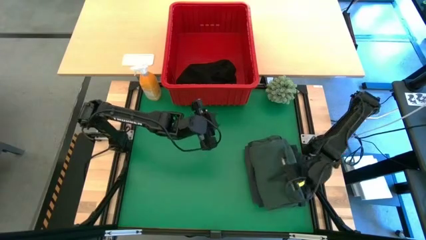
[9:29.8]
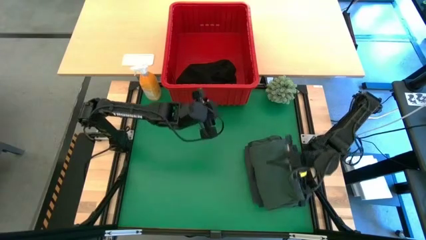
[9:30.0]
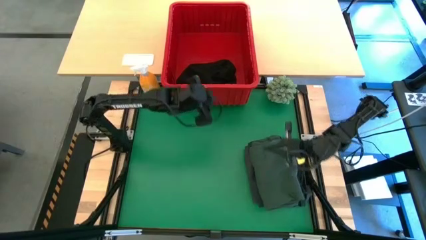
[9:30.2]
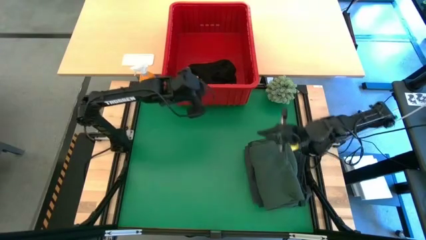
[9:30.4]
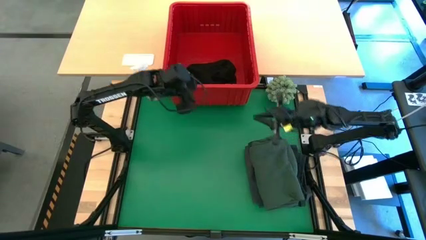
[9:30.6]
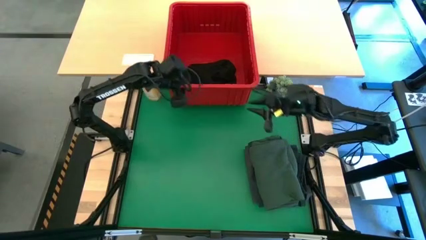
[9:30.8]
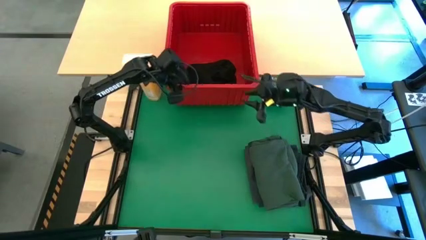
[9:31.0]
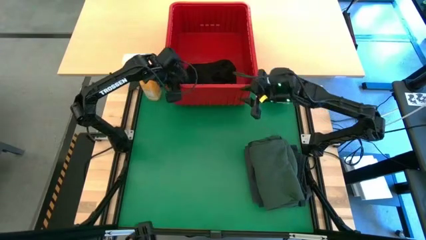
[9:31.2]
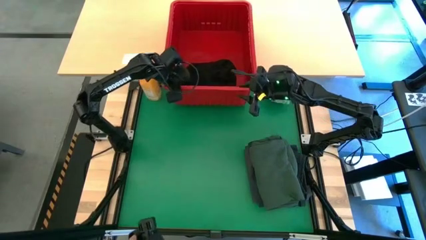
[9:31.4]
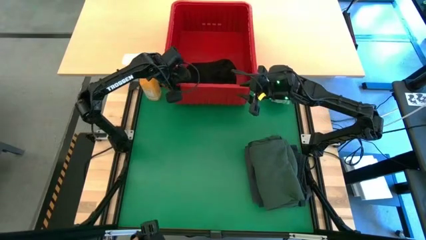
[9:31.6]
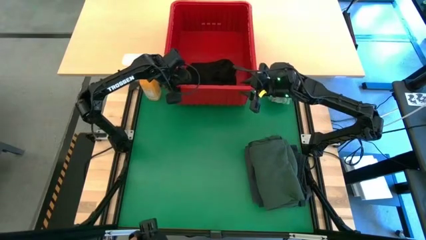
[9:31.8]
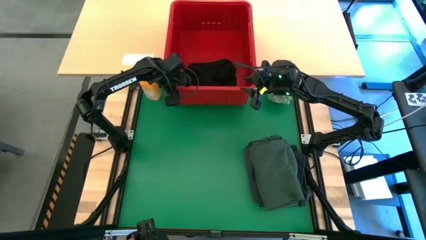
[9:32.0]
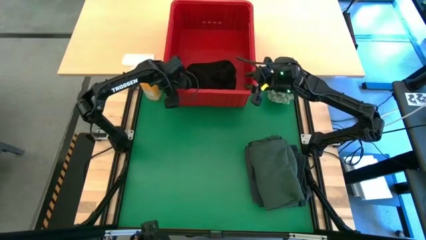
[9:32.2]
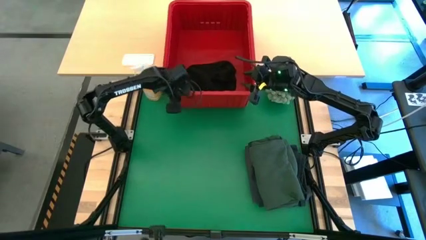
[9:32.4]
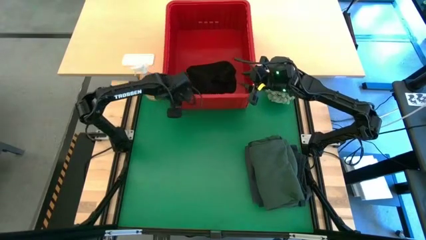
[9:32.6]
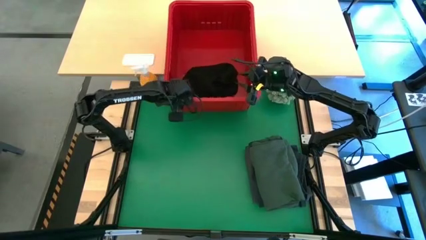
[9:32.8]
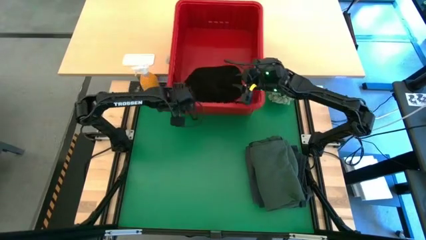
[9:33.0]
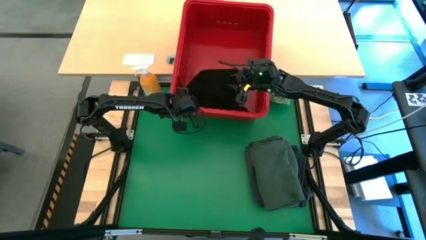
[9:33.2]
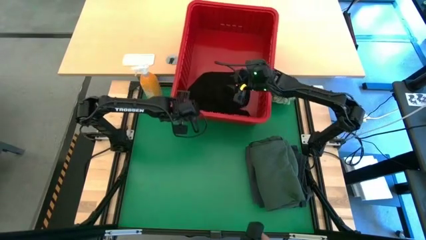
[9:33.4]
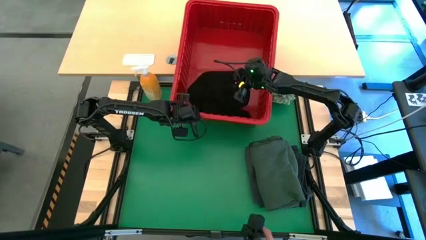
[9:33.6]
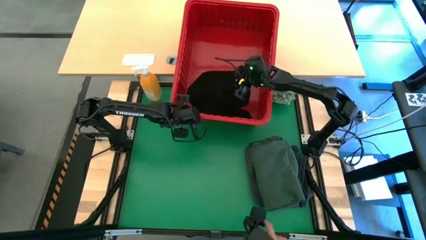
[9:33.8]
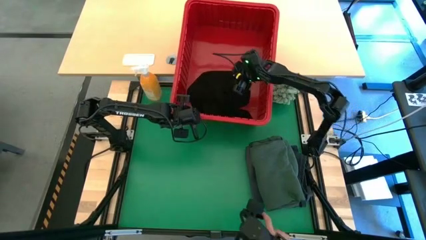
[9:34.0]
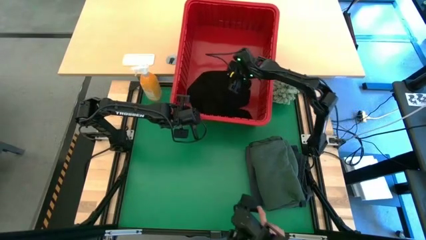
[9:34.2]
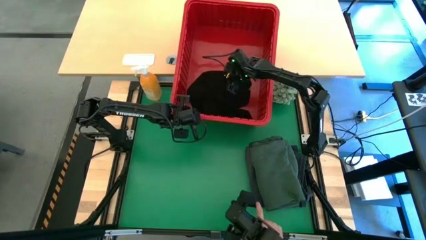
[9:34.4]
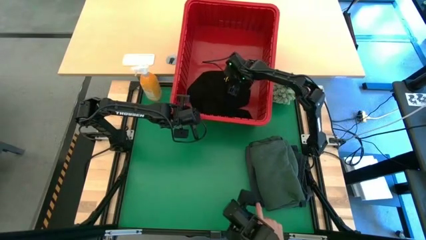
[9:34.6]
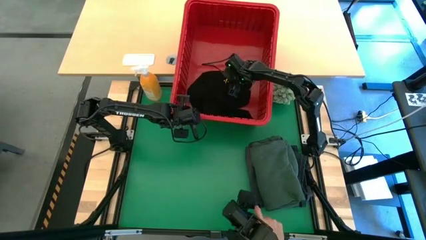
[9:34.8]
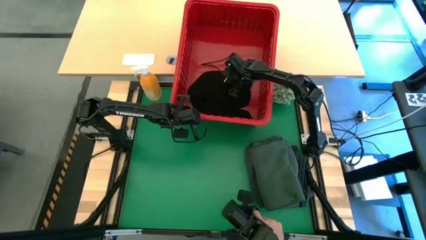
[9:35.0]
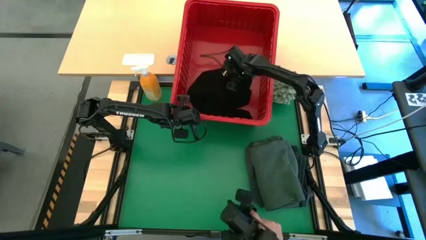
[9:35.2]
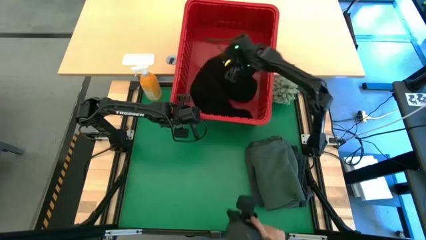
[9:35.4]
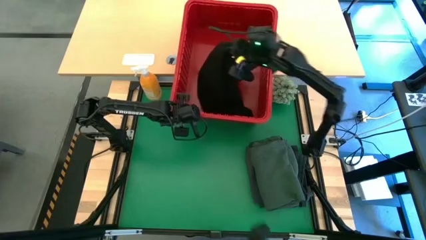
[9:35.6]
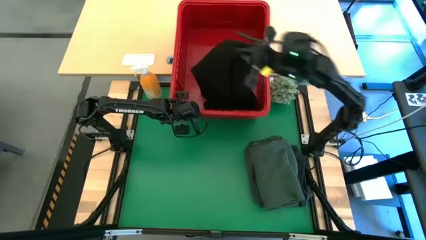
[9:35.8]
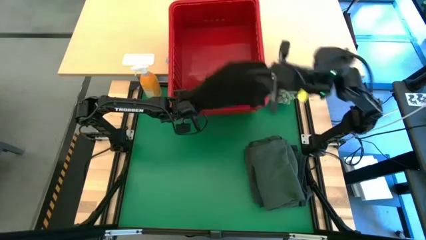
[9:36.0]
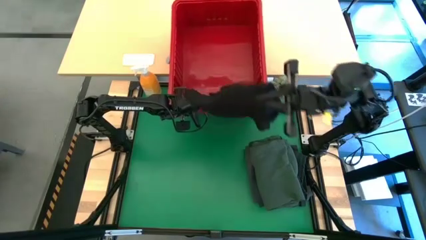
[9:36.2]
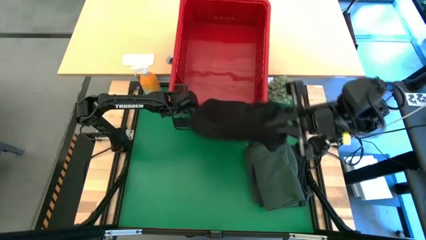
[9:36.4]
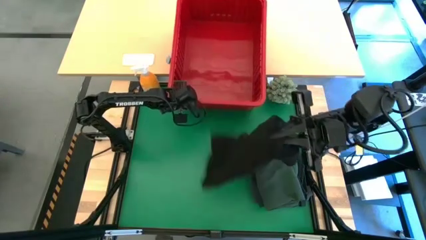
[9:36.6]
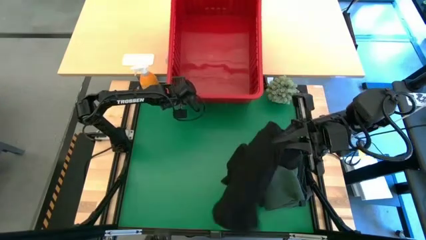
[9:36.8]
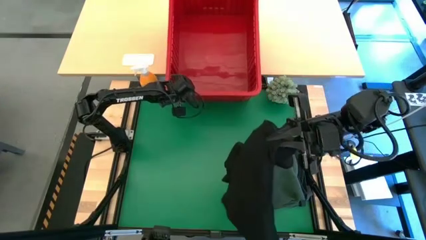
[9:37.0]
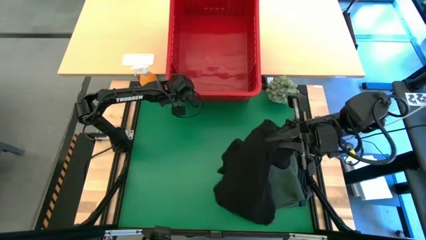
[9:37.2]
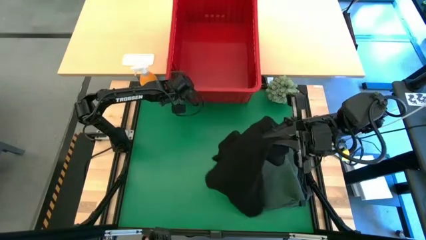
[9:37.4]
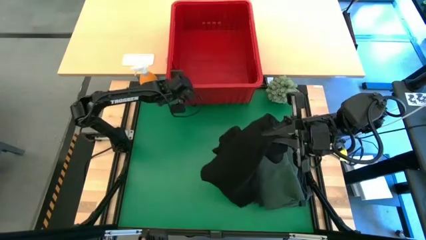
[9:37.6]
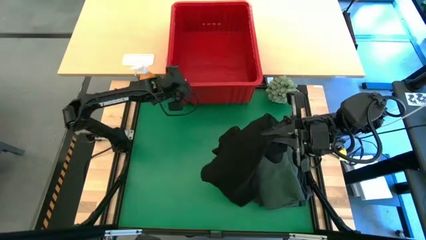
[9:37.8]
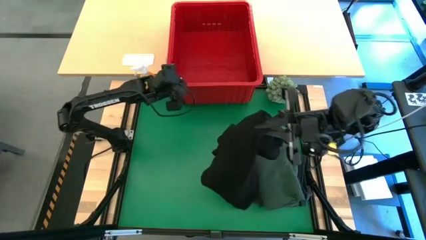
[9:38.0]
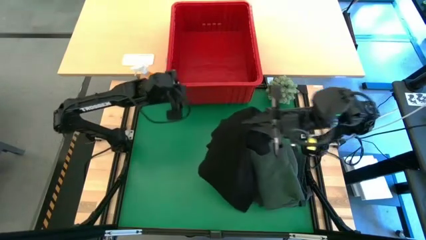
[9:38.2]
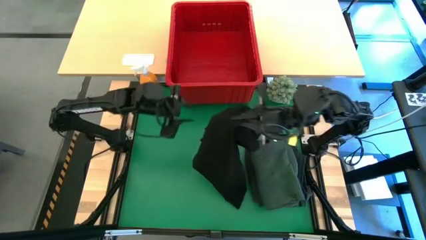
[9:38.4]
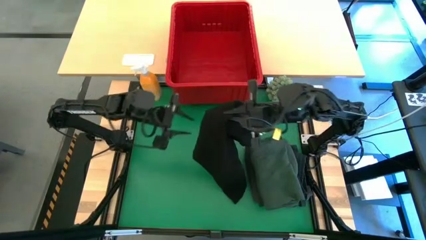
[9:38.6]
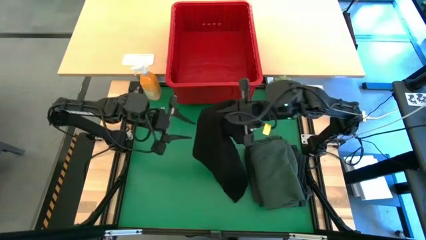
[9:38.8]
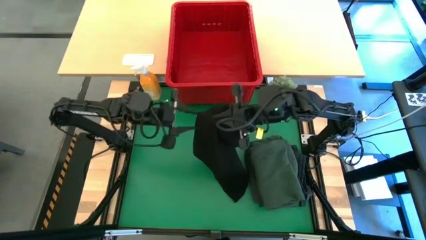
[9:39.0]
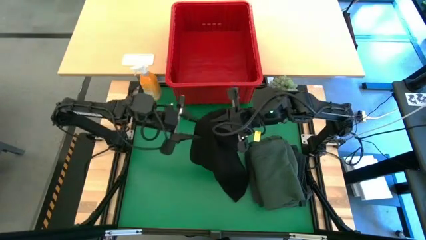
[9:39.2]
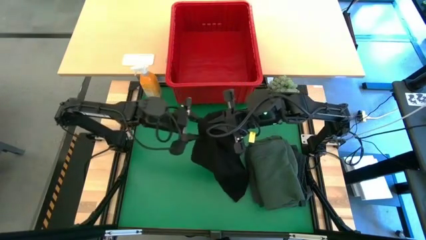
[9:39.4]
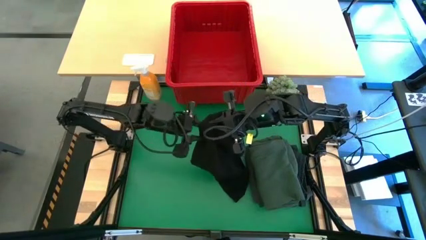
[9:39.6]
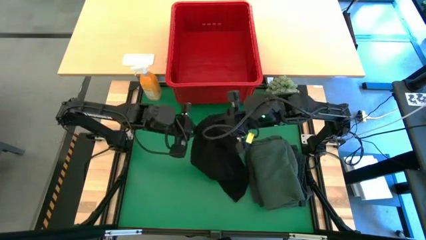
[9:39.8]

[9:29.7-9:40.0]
Task: Fold Laundry from Bin
Remove the black shirt from the red bin

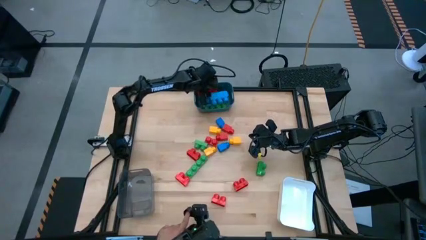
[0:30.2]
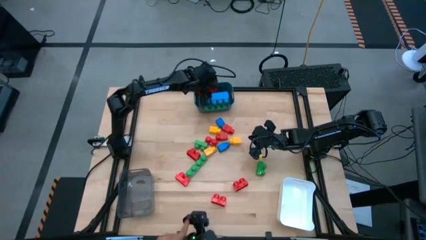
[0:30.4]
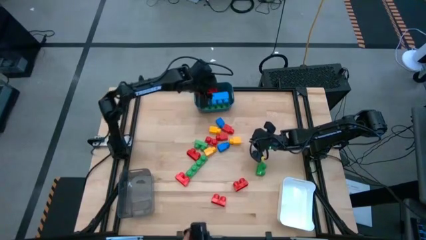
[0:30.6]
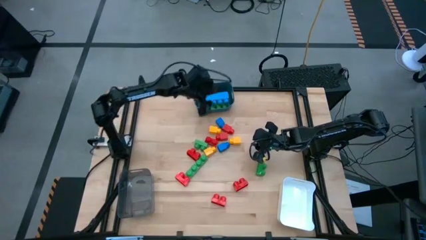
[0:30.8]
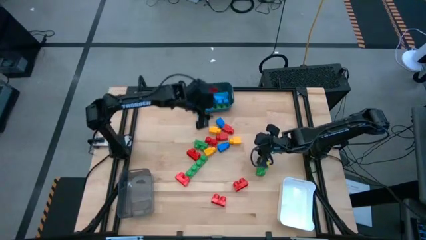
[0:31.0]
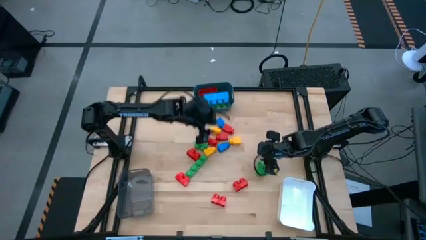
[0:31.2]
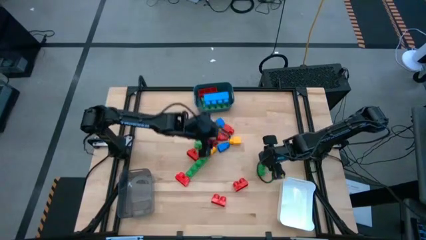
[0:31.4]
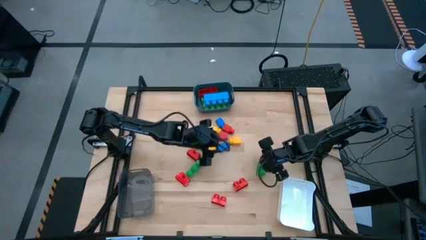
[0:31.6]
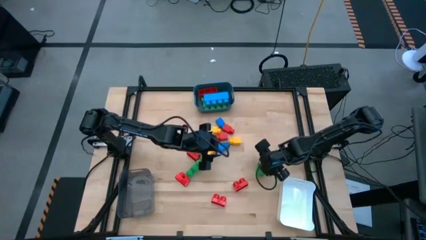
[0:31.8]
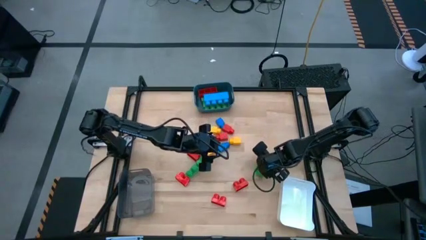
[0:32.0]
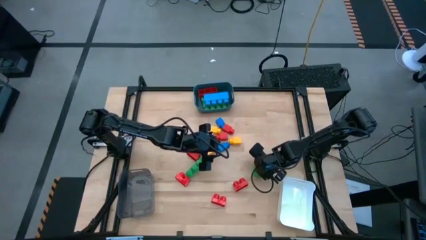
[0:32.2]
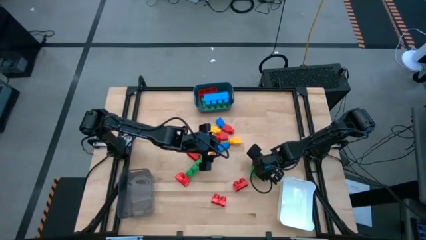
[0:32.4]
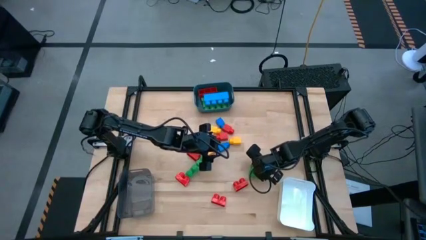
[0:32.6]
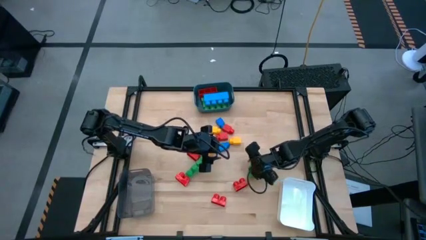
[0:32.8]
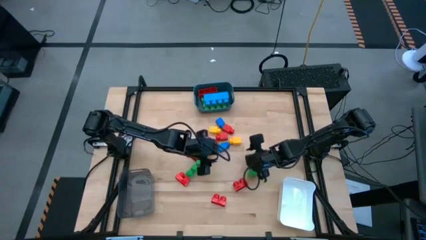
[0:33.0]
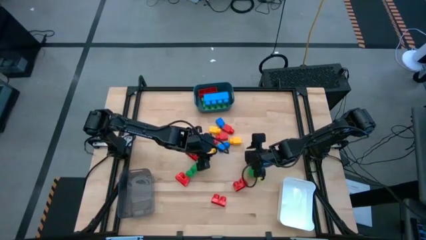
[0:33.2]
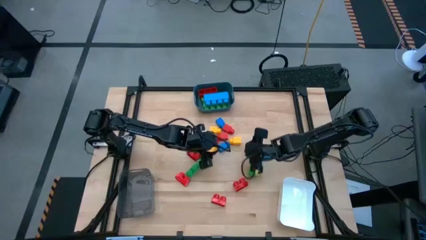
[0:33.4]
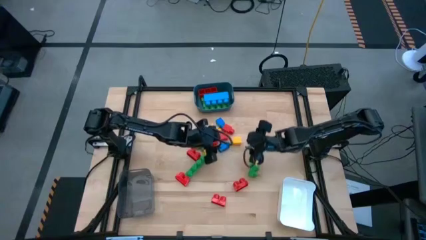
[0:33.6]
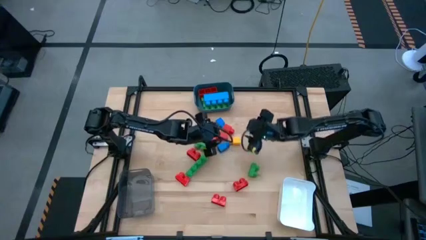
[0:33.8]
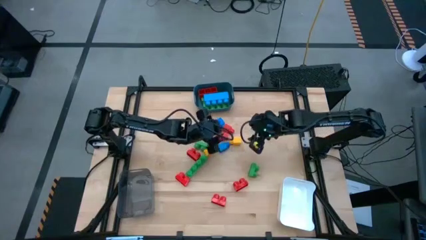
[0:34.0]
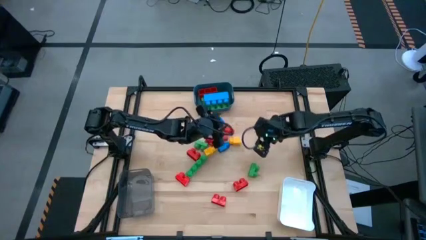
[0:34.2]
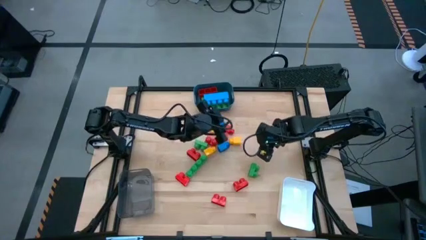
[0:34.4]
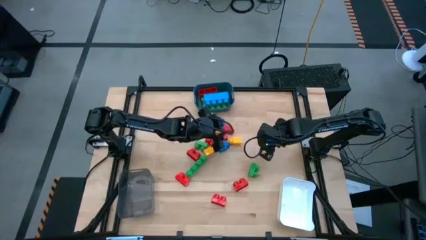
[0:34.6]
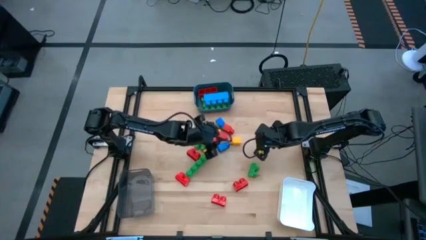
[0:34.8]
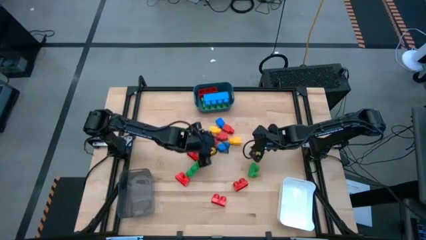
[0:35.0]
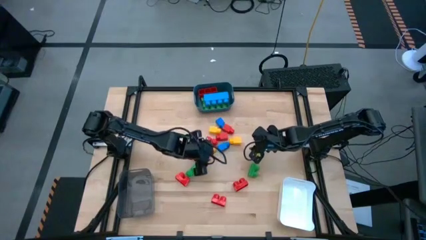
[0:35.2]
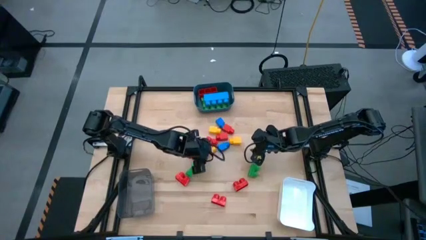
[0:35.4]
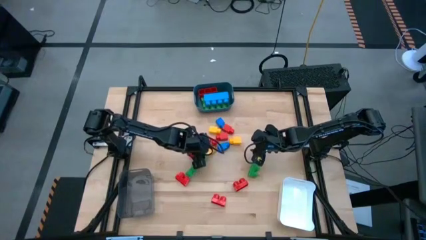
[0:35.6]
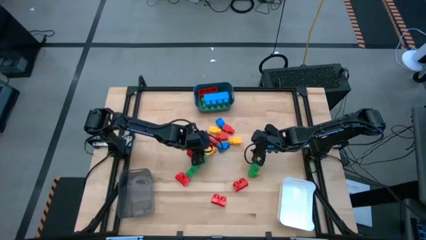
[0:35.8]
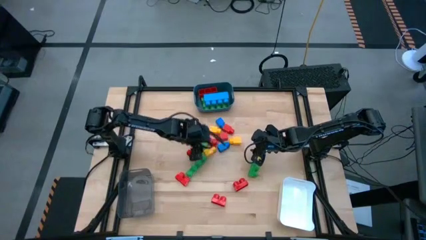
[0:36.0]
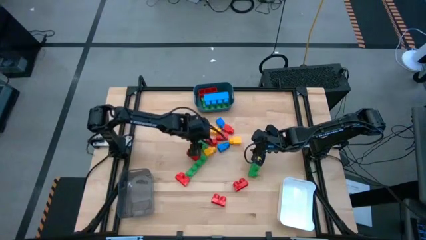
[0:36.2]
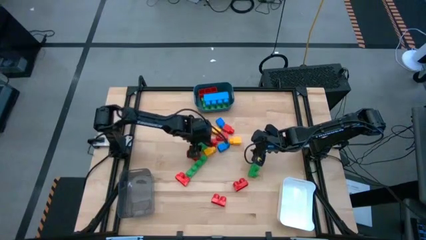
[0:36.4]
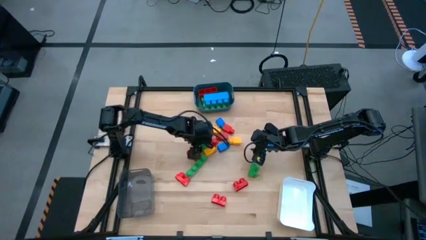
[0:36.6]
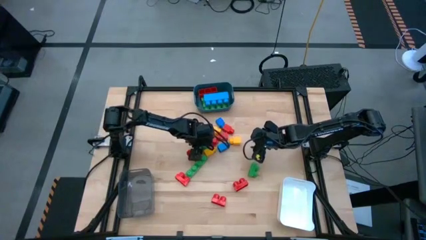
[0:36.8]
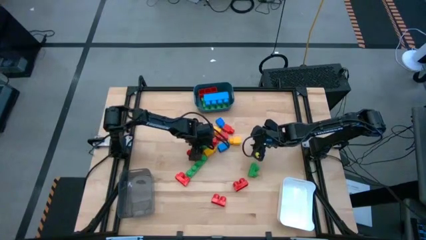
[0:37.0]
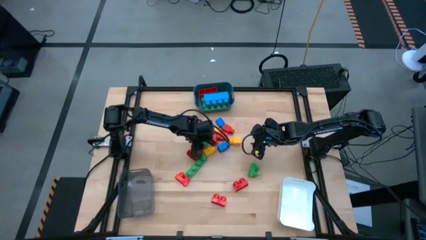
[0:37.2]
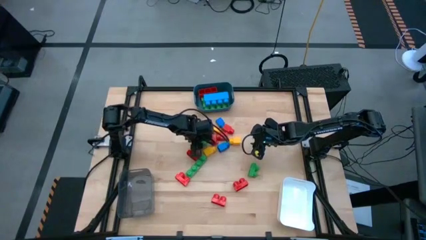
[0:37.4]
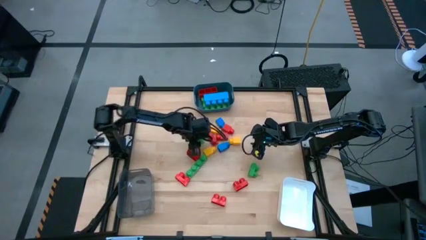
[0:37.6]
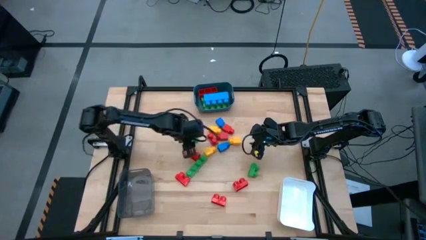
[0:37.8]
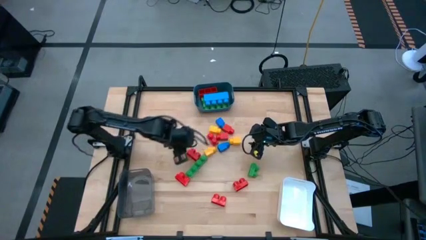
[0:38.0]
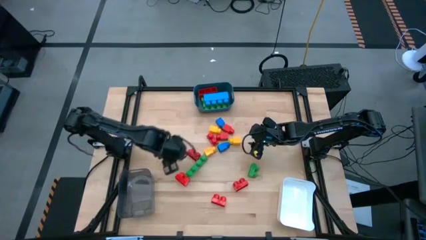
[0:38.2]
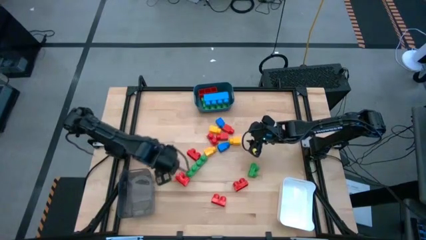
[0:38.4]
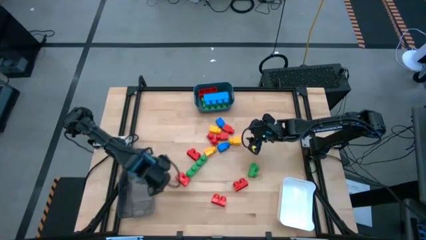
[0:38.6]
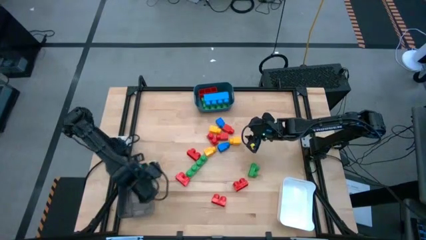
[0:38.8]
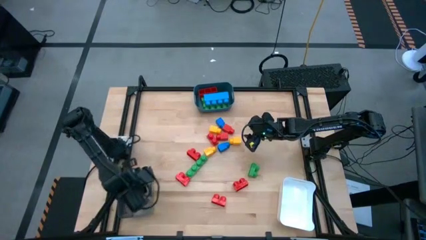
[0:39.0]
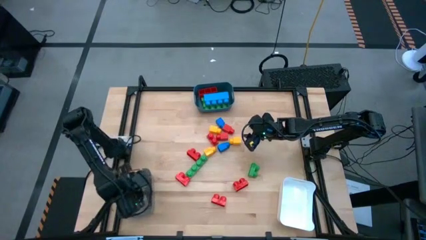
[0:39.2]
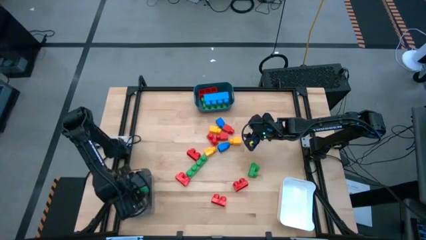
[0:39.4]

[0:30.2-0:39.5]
Task: Sort blocks by size
Put the green game piece into the gray container
